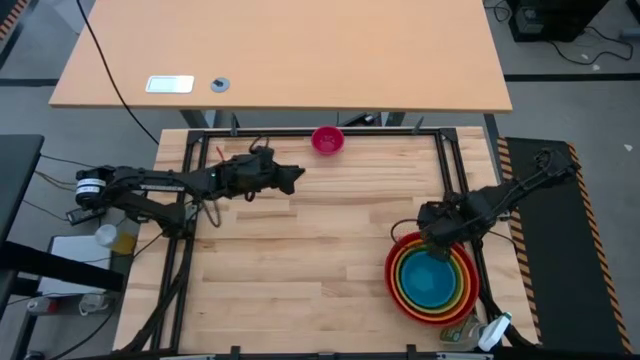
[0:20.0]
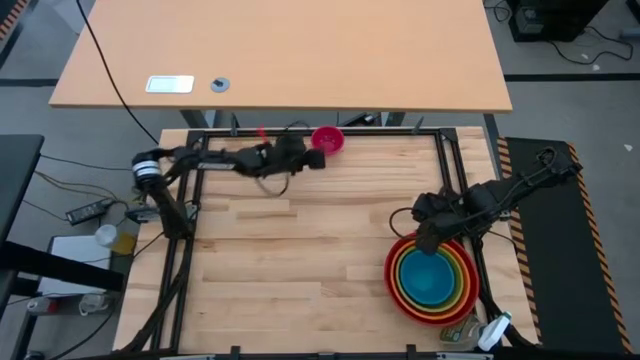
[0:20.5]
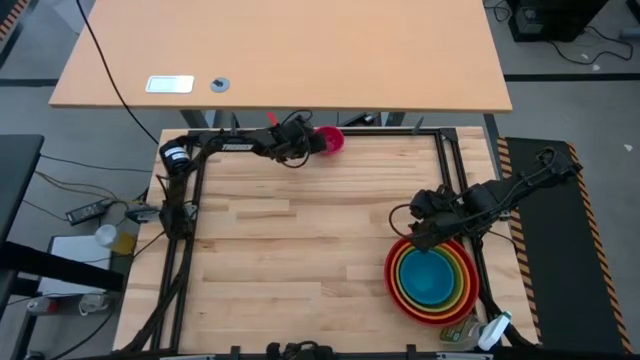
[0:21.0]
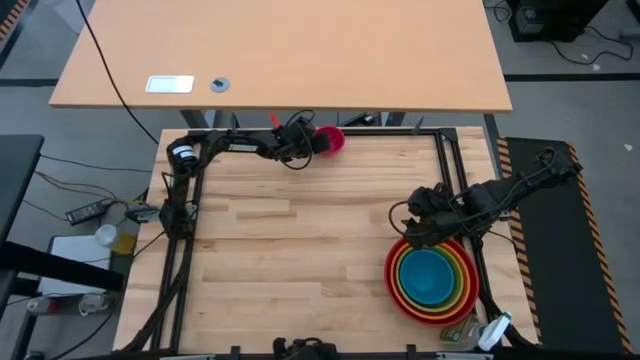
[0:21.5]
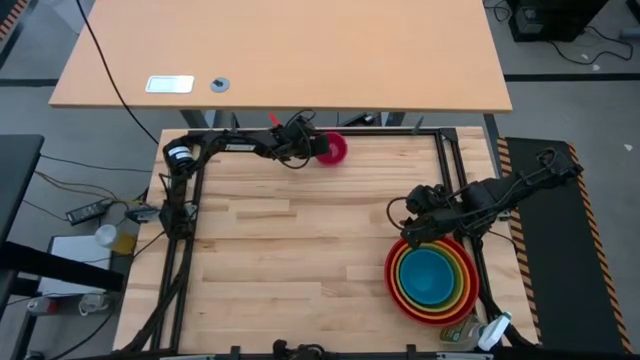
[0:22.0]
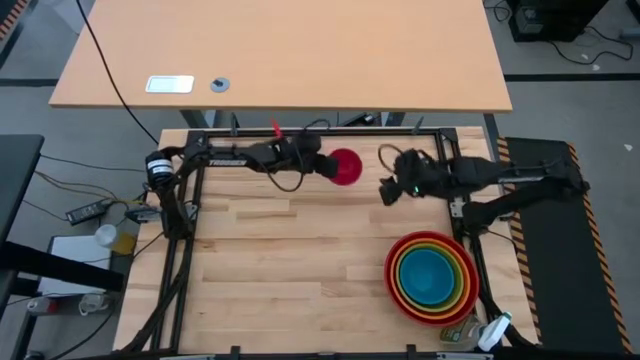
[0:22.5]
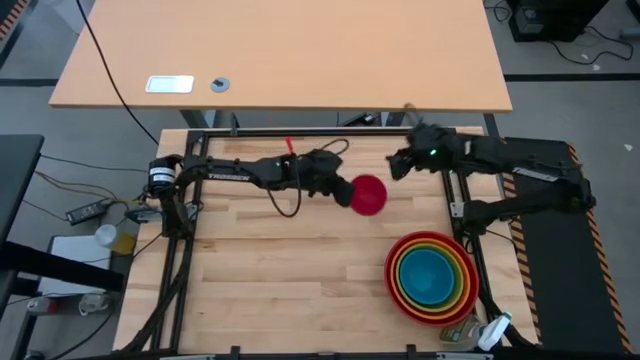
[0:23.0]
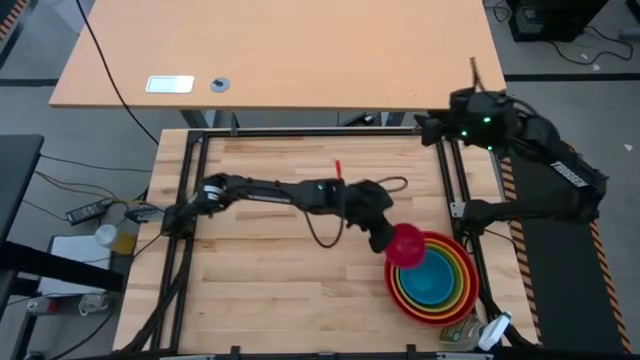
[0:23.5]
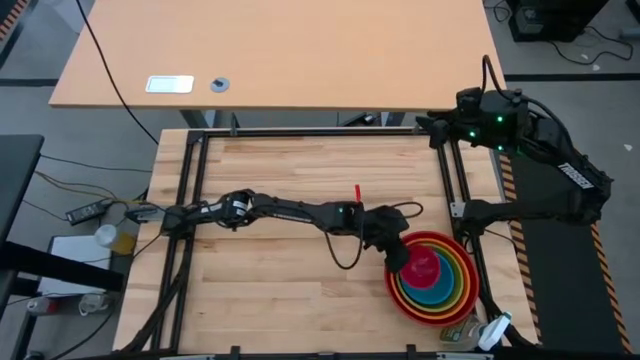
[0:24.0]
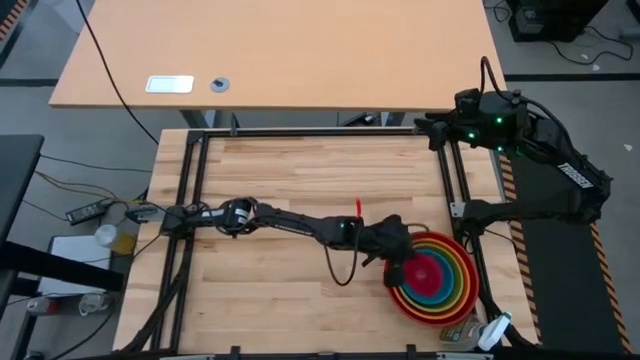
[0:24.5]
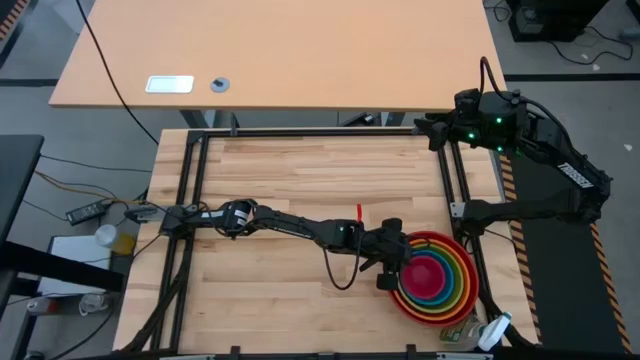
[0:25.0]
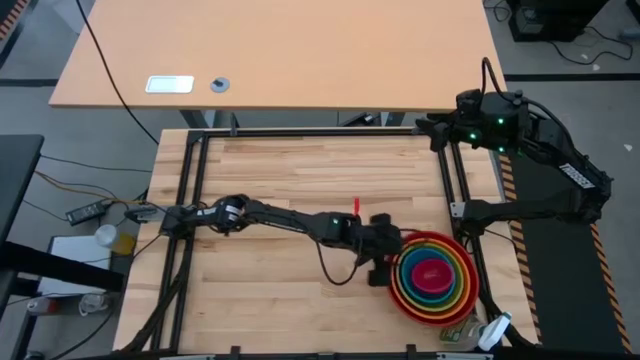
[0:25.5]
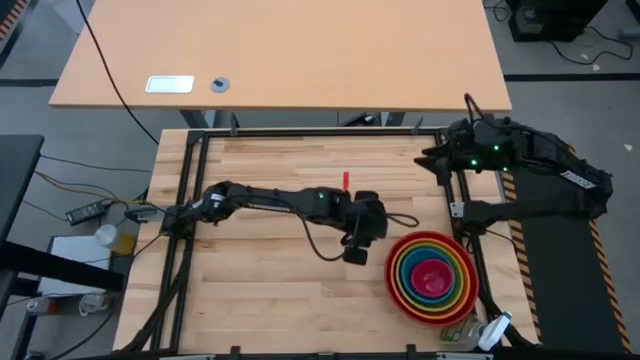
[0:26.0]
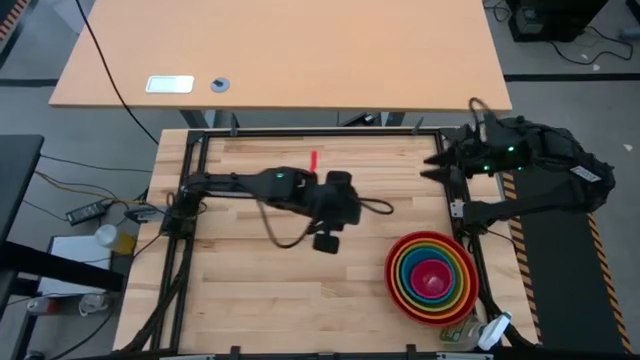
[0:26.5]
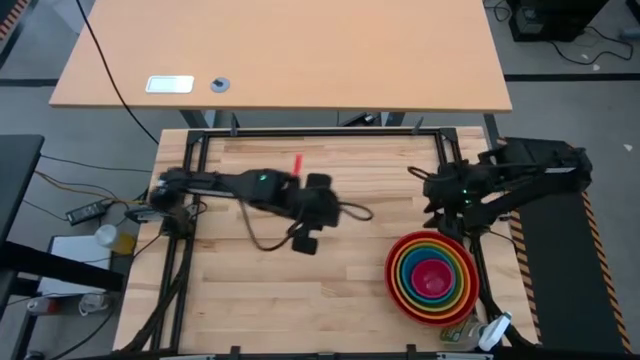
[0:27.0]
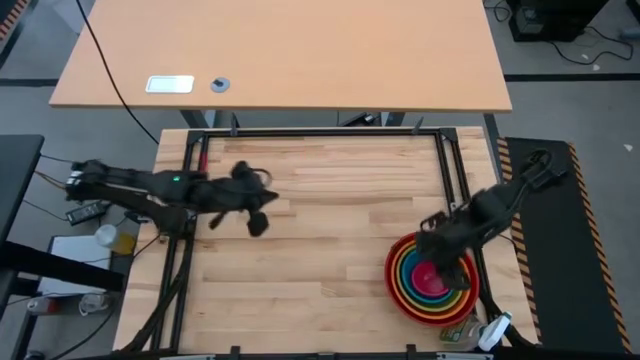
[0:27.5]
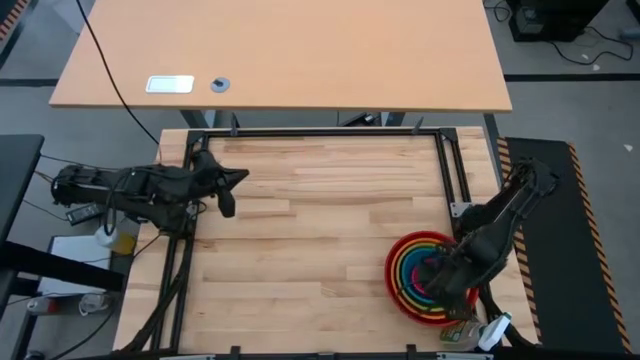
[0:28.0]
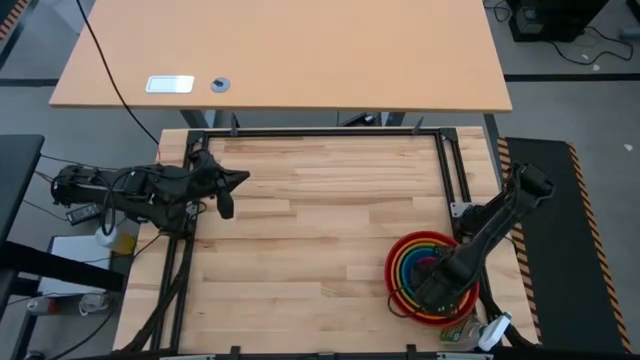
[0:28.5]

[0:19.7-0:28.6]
Stack the pink bowl into the blue bowl

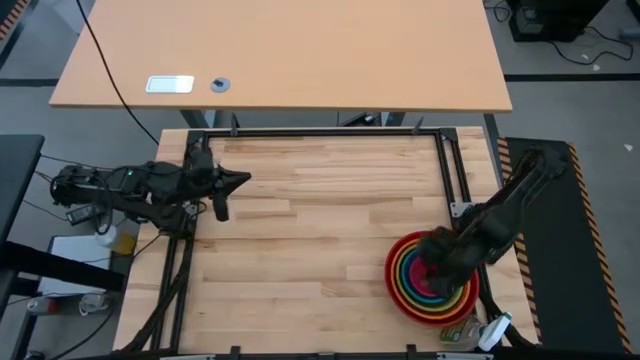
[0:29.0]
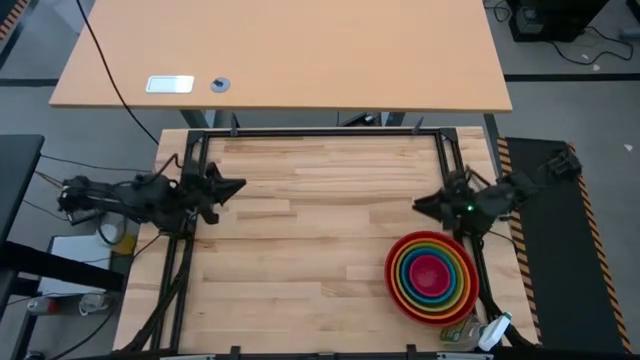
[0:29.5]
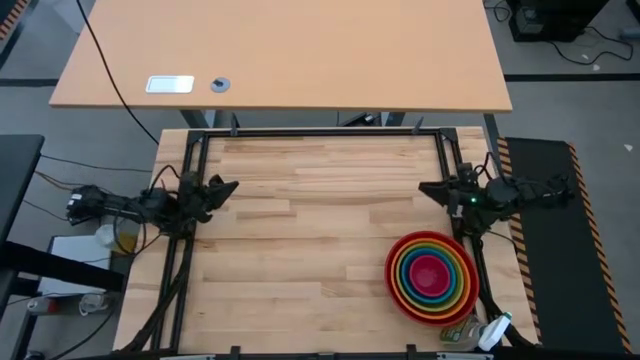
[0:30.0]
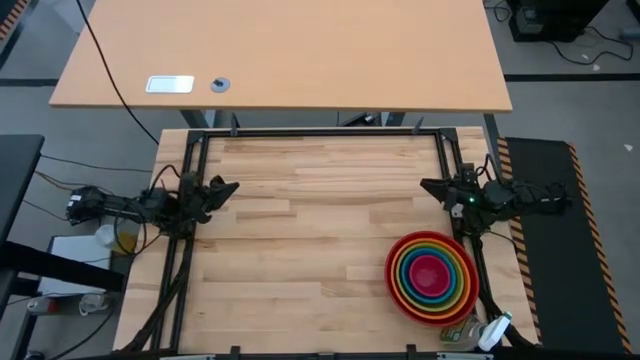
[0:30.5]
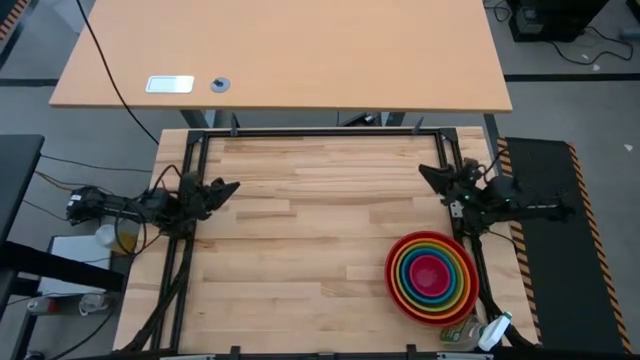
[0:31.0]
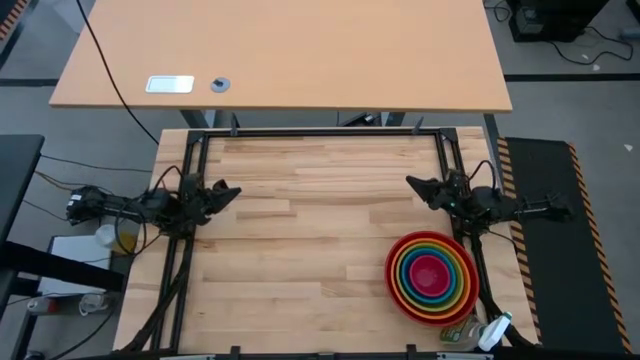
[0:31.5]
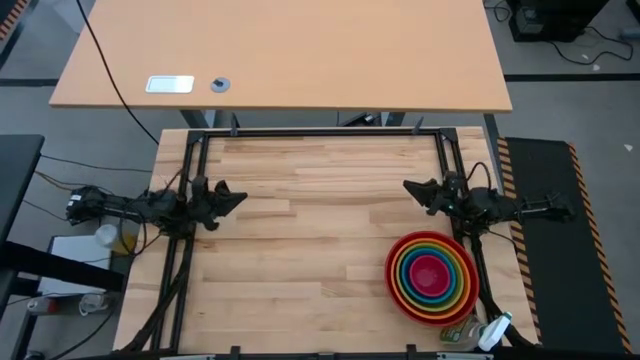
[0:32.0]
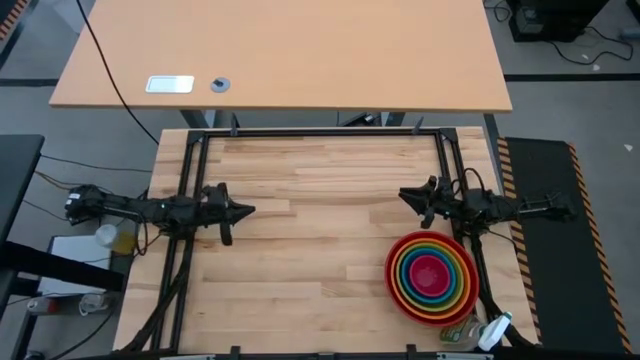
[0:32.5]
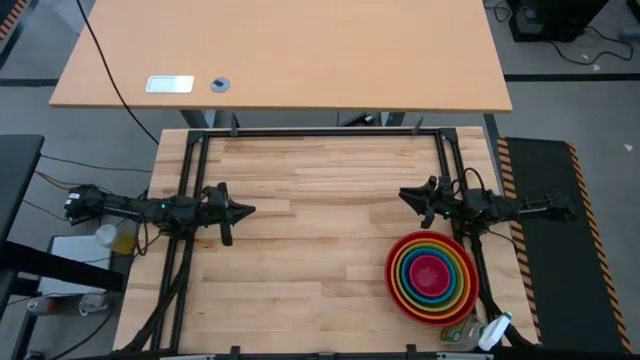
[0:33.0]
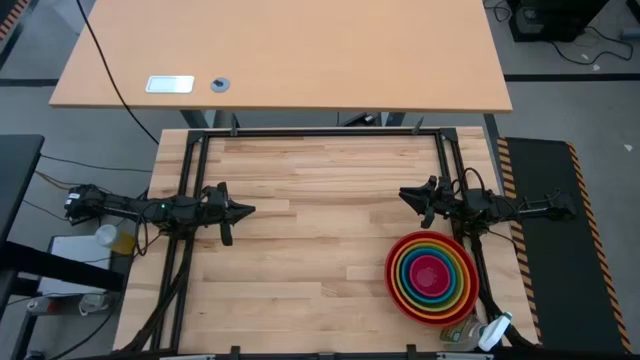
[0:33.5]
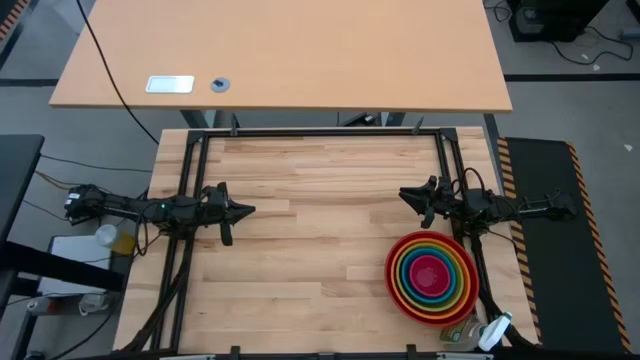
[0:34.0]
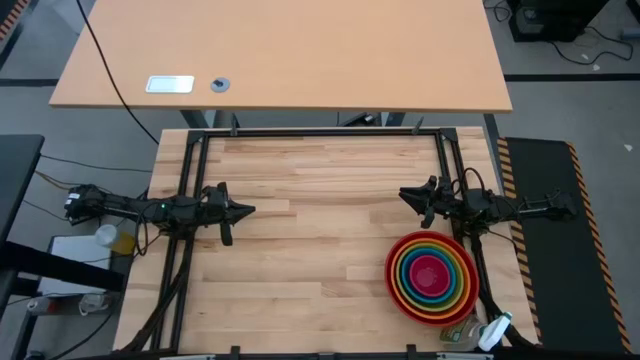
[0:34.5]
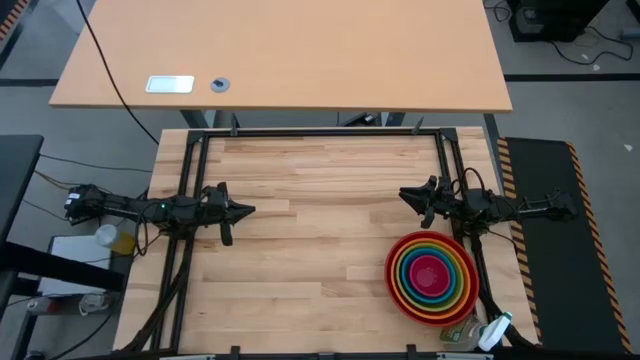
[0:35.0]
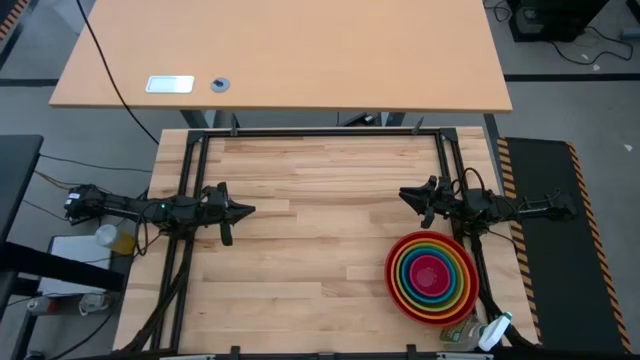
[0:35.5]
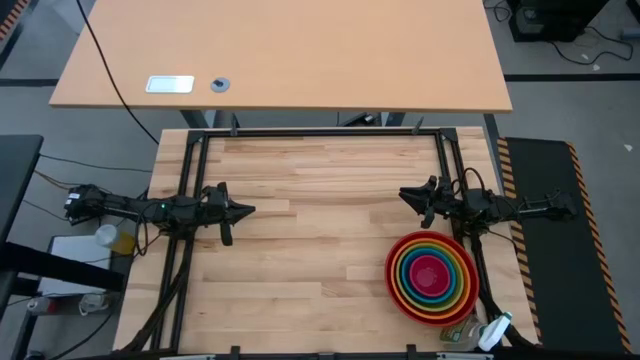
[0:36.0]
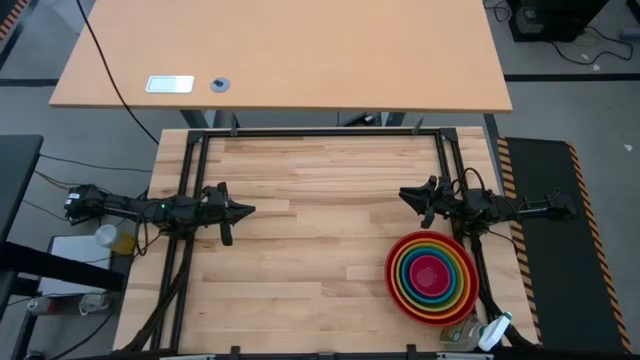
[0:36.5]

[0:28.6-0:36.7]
Return to Home Position
